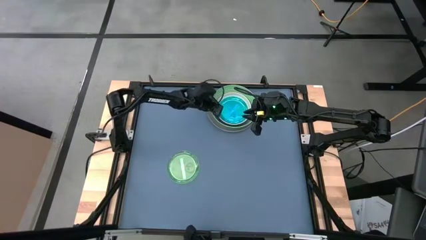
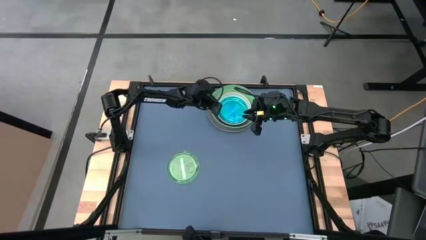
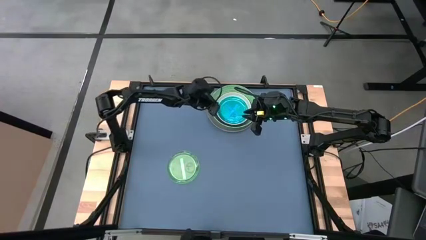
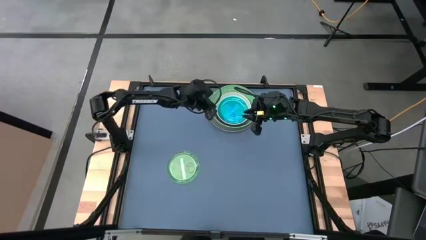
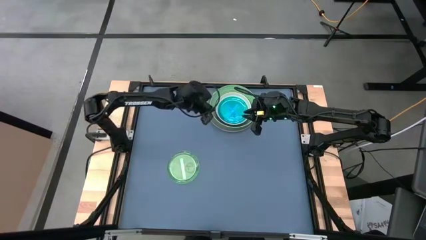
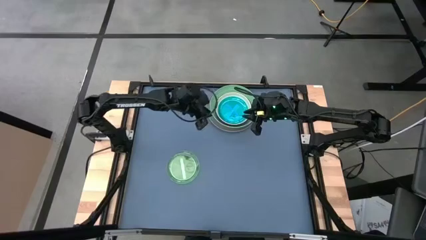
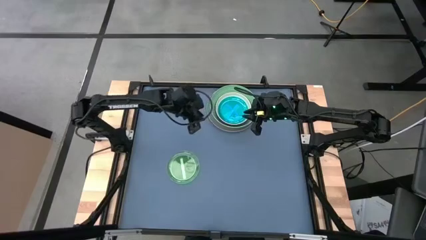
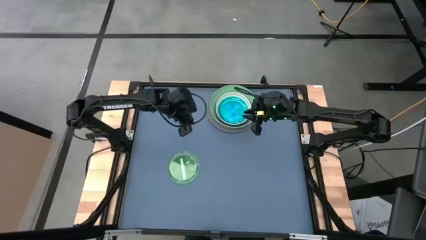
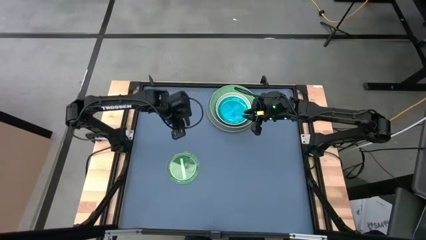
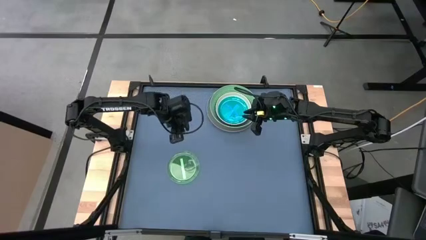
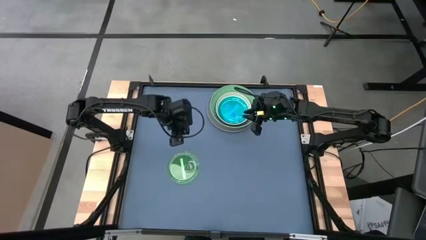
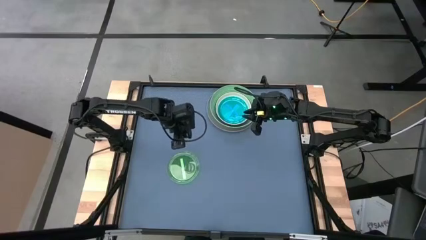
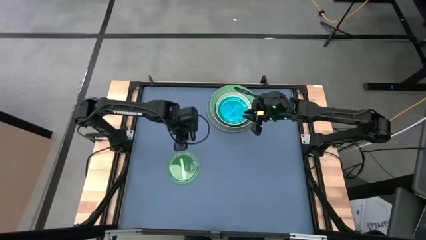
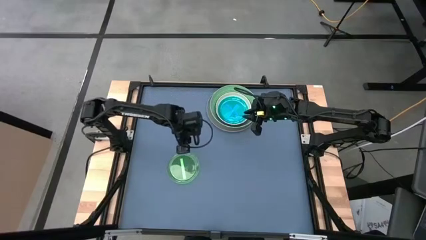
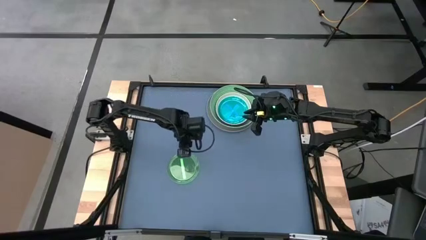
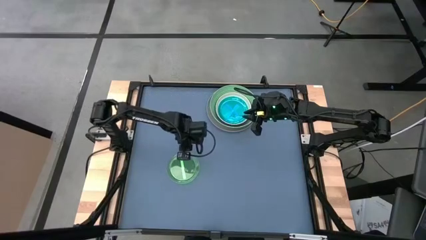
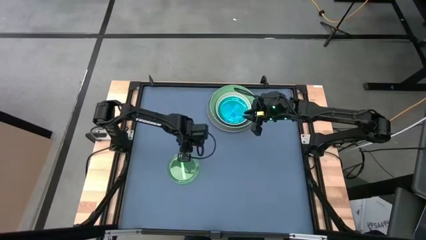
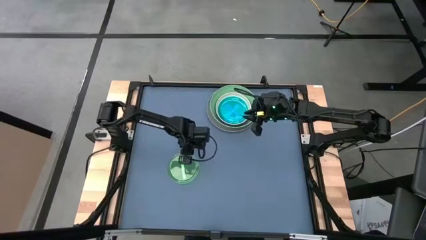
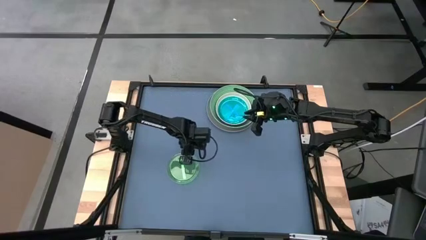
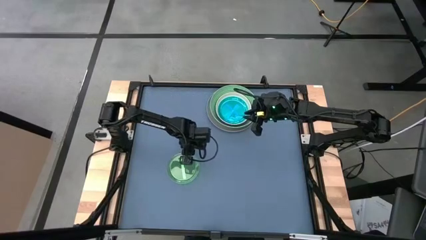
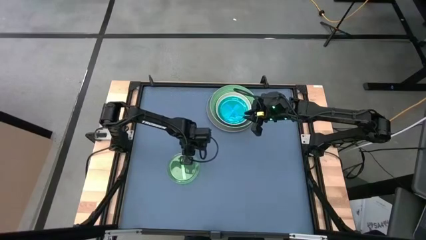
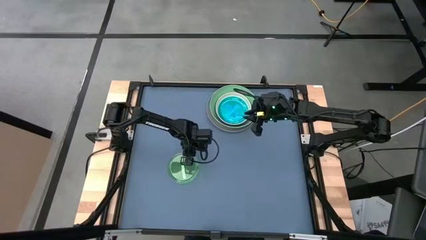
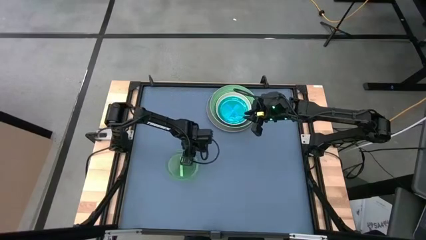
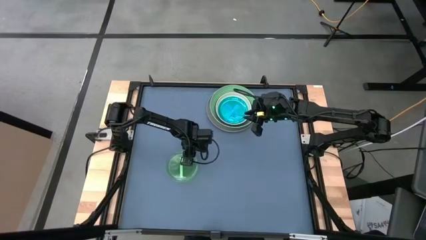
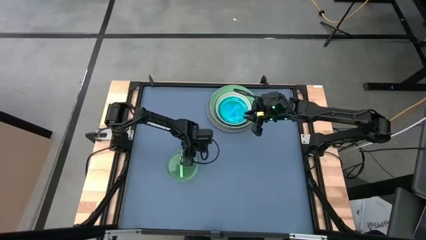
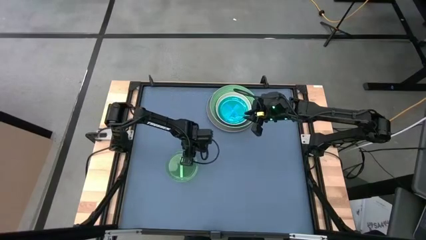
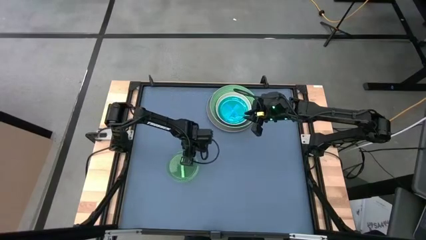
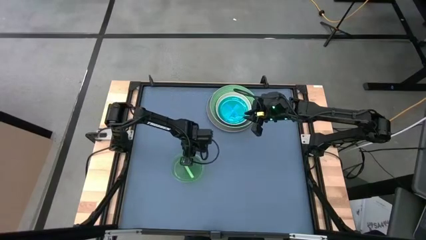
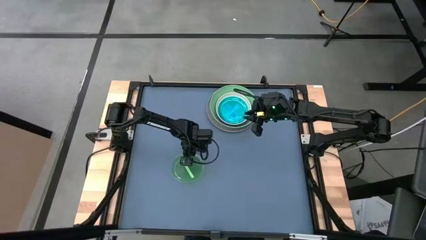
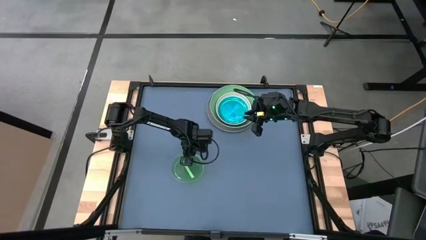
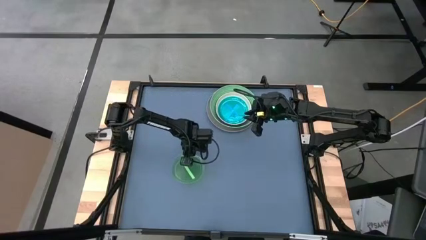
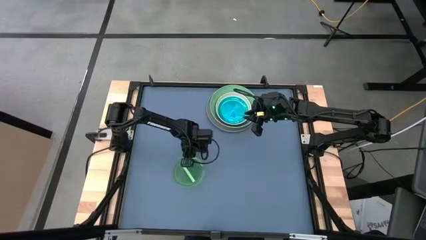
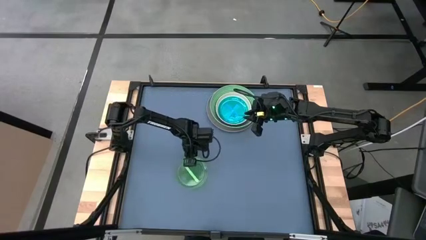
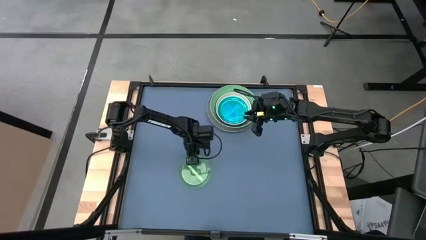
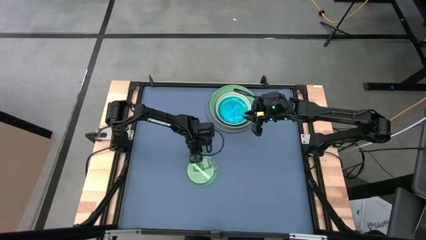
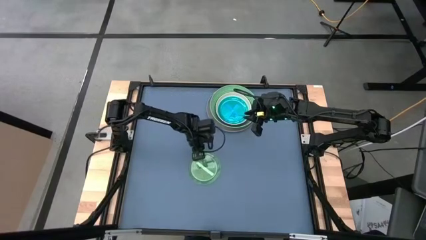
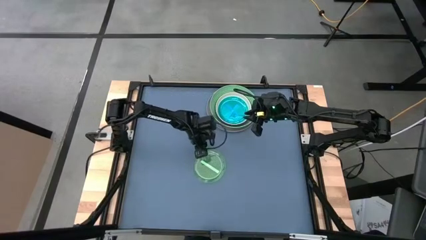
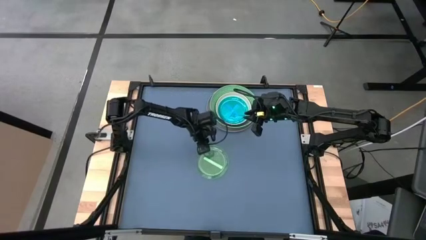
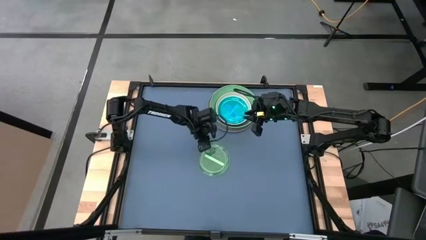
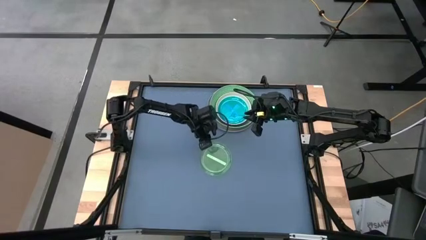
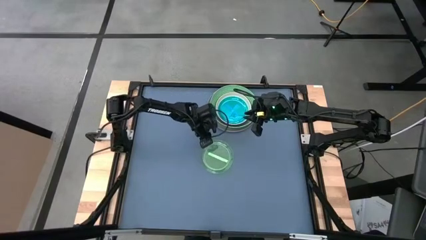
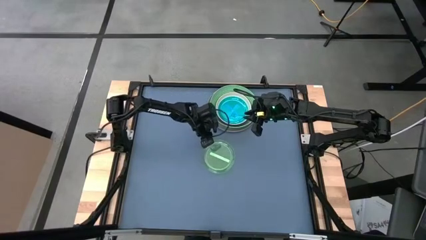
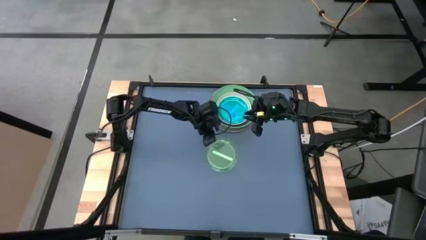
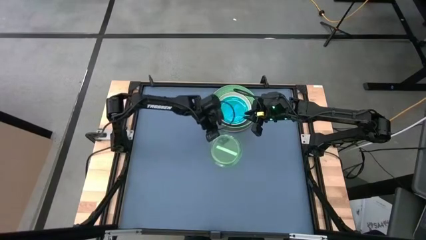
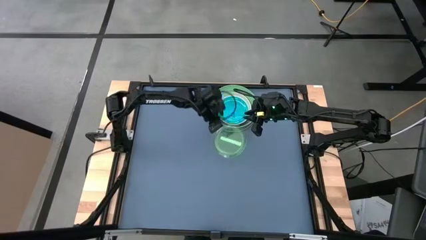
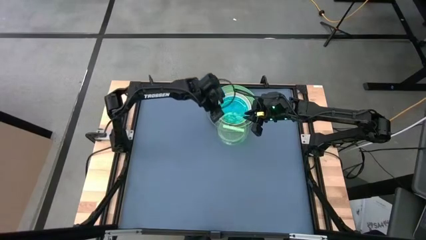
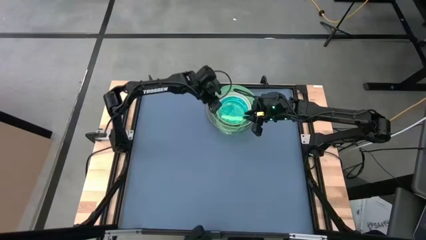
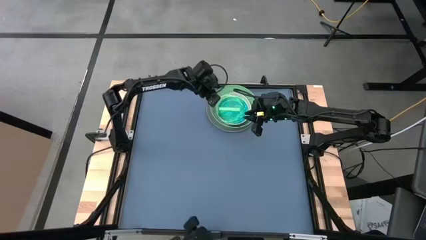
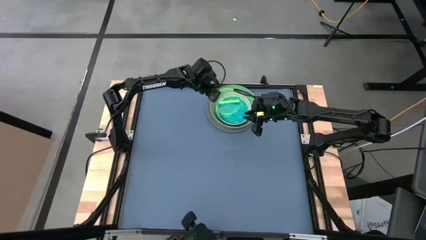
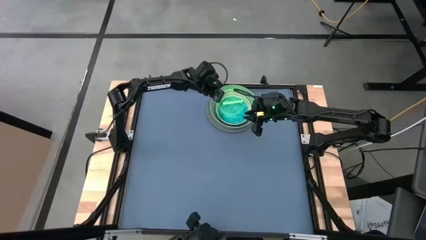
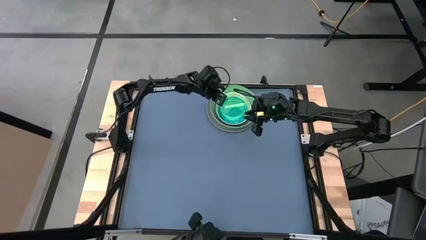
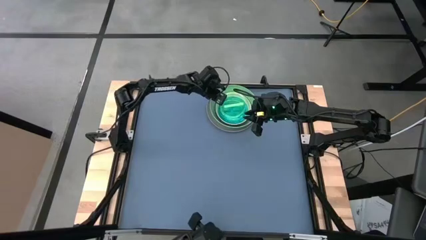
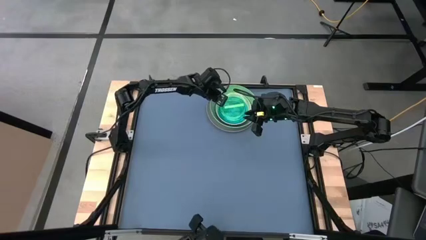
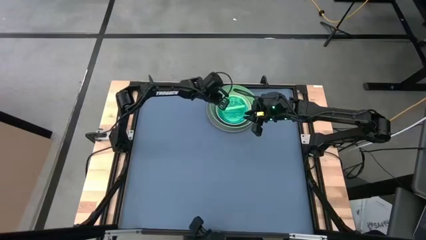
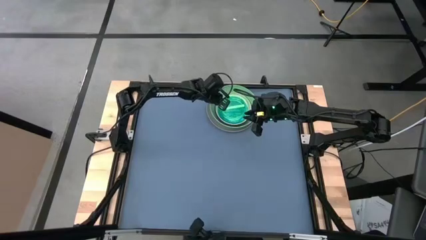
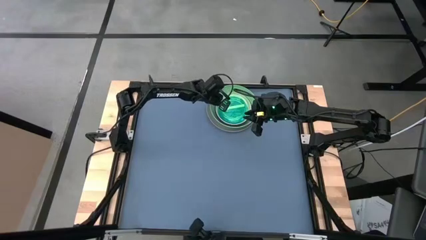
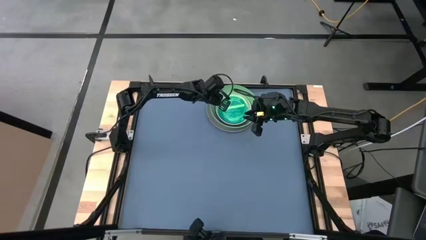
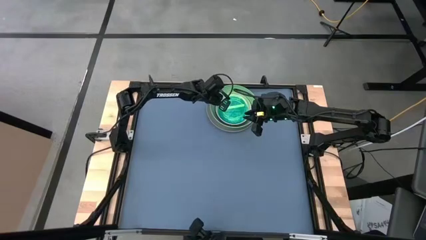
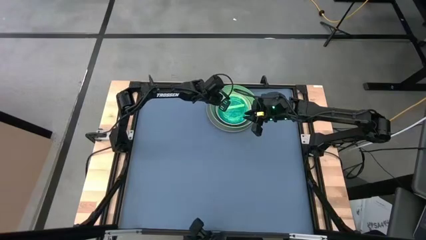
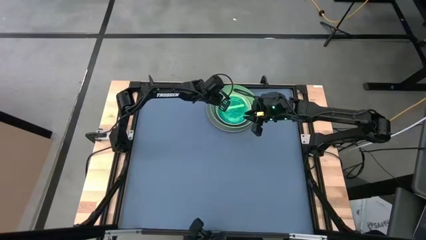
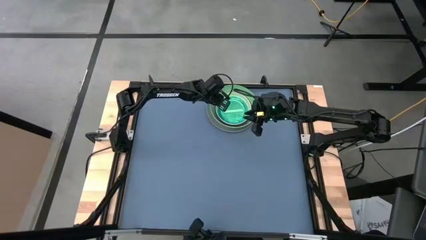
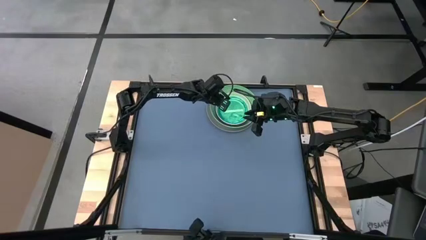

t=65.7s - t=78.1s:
Task: Stack plastic plates
Stack the small green plate on the small blue plate

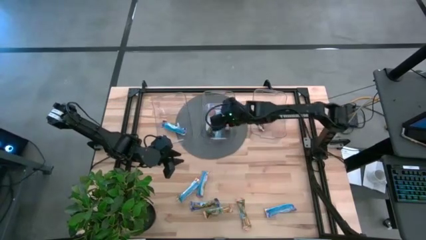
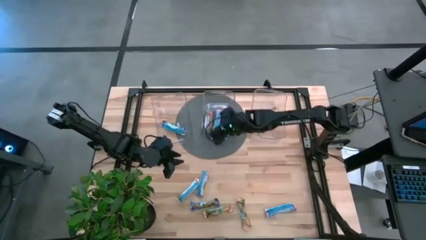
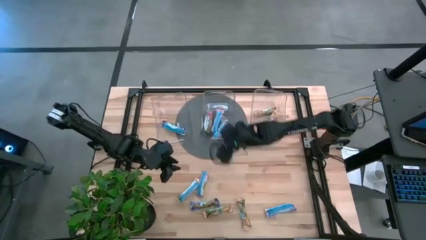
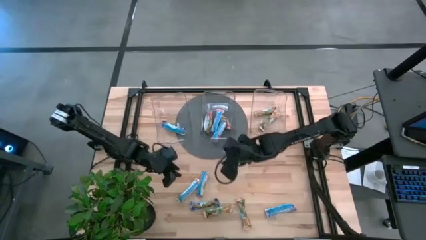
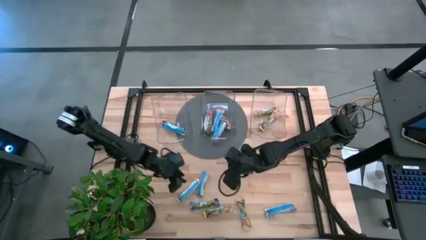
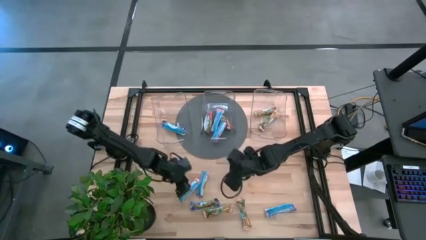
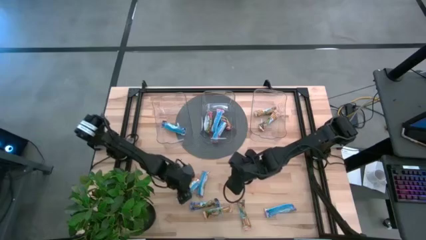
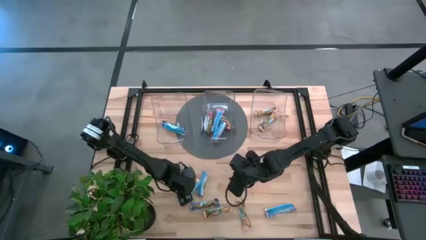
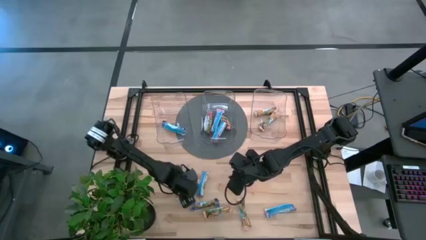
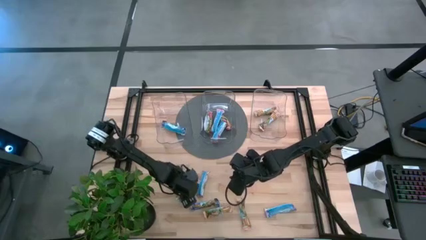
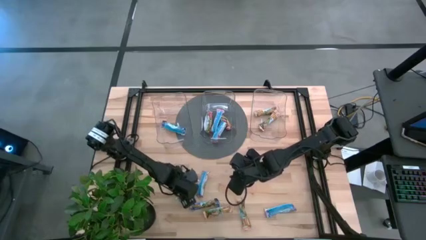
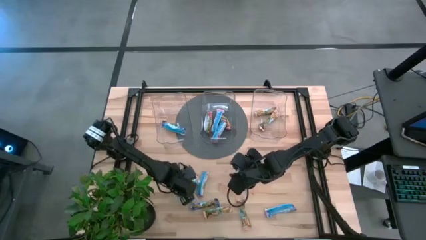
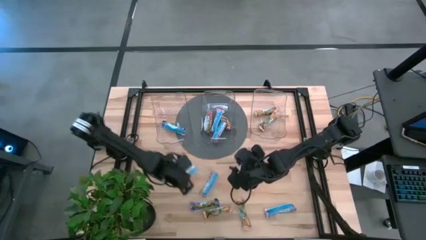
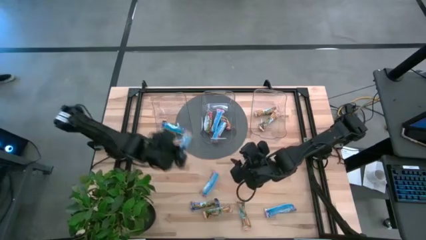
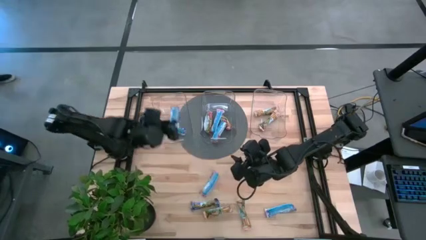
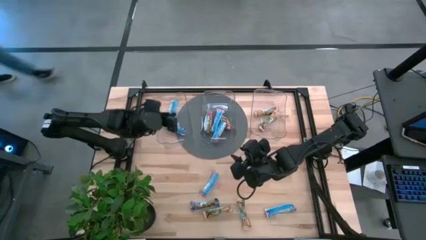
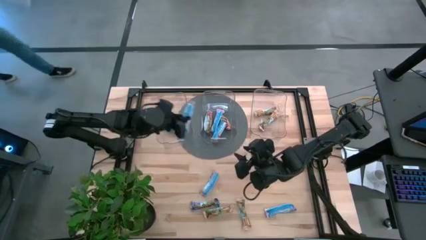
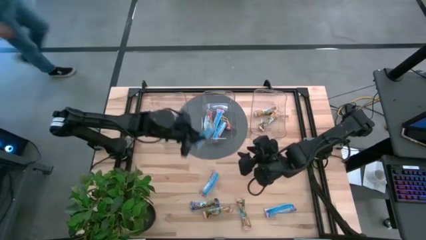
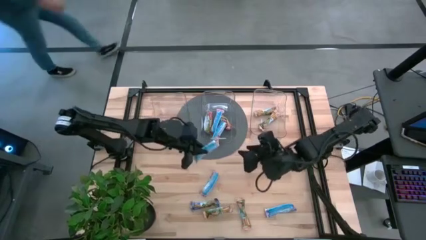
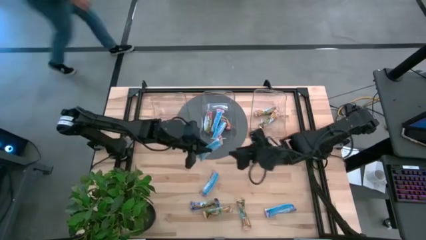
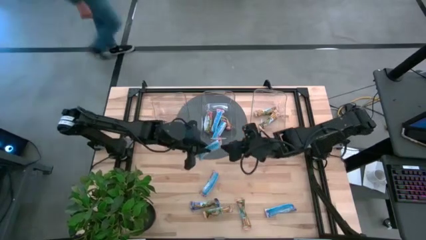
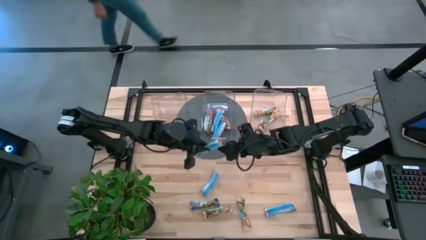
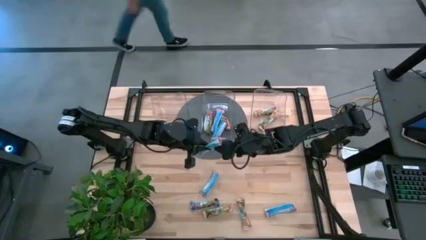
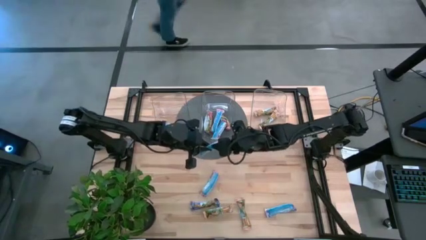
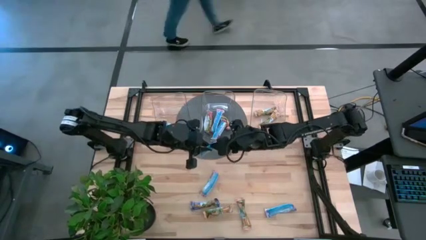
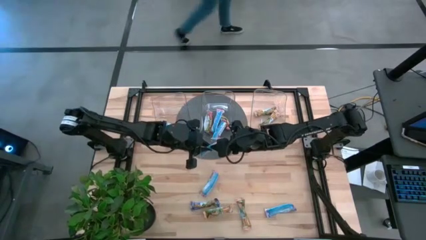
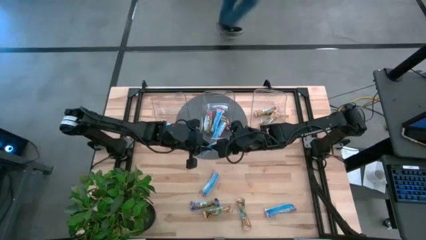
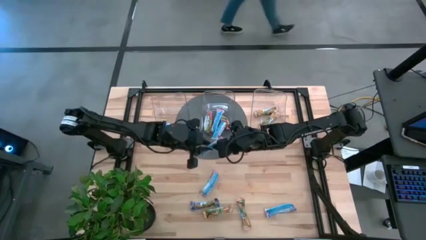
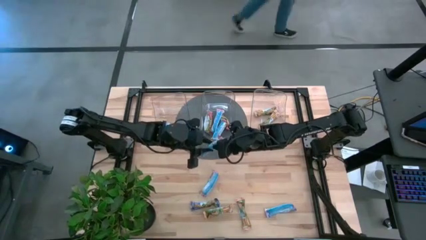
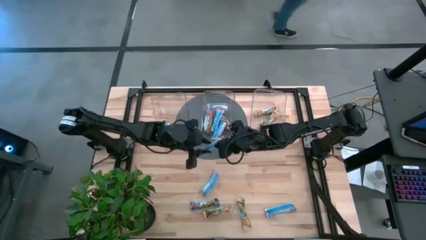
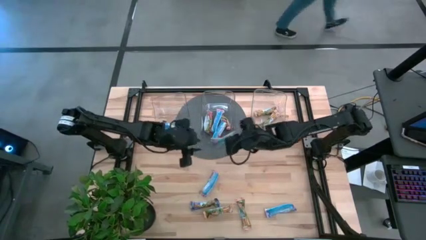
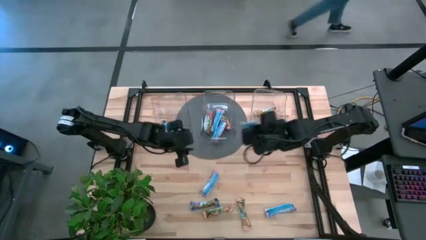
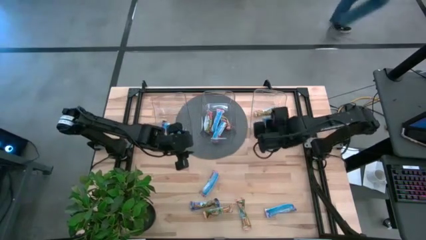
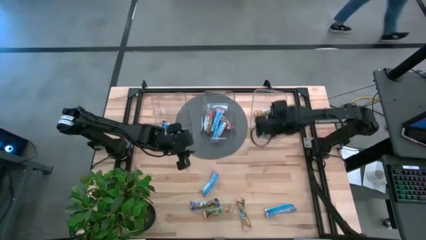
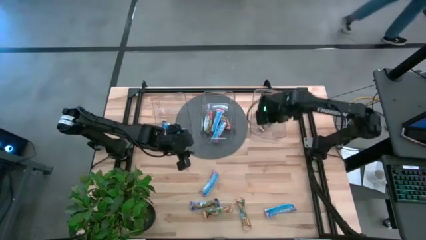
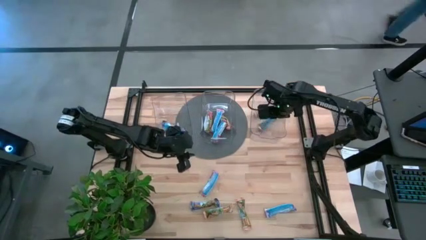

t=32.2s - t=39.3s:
Task: Pick and place Granola Bars by type
Put the yellow granola bar into the right transparent bin
